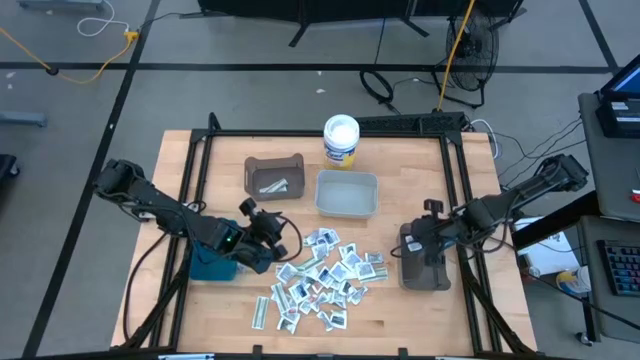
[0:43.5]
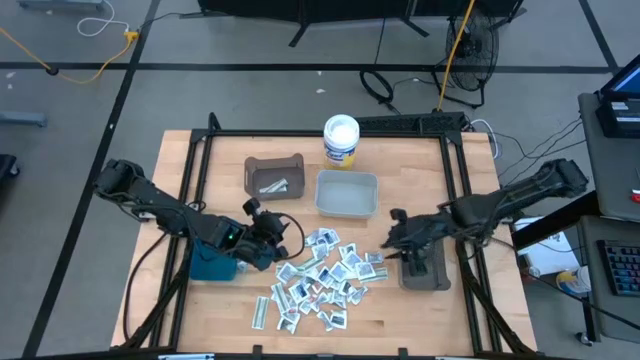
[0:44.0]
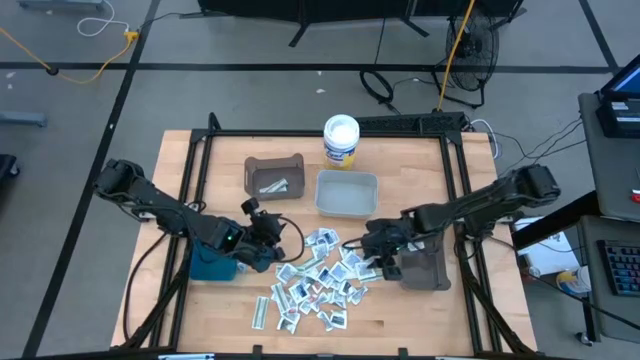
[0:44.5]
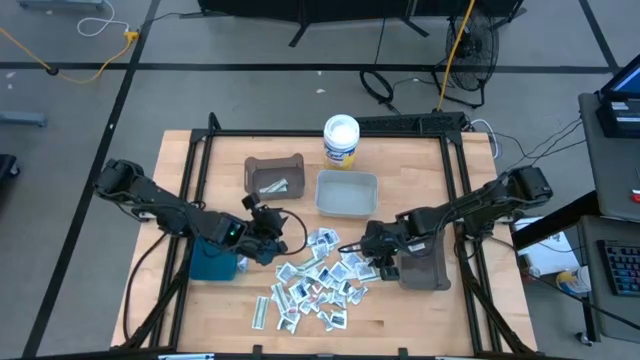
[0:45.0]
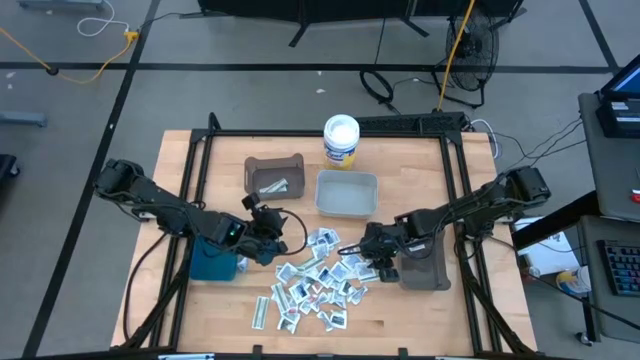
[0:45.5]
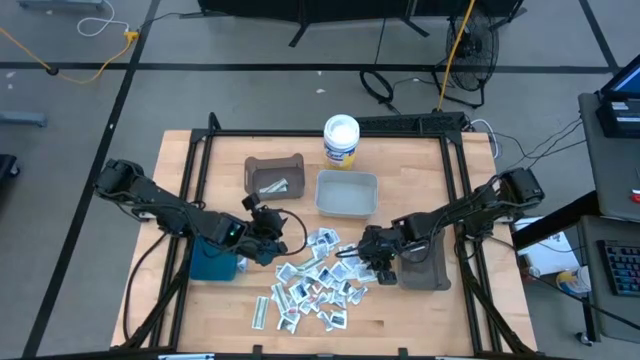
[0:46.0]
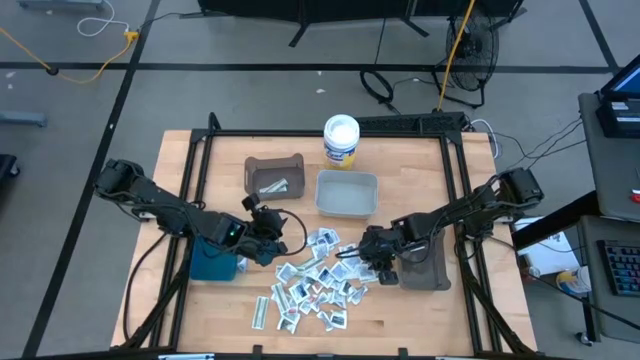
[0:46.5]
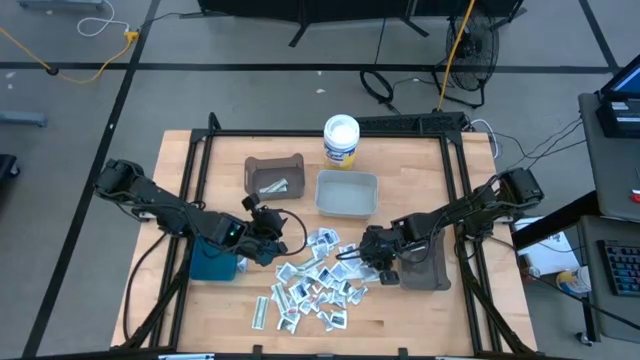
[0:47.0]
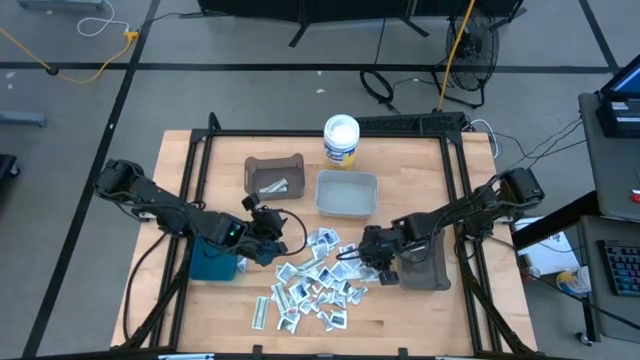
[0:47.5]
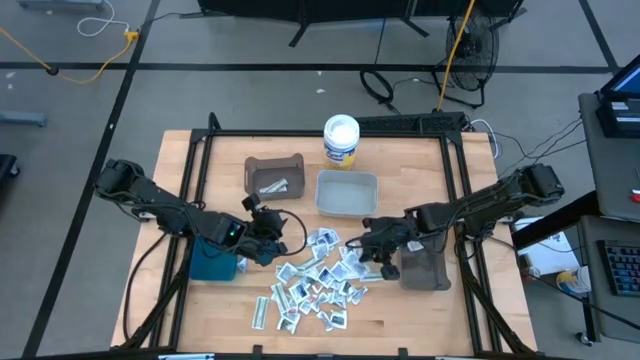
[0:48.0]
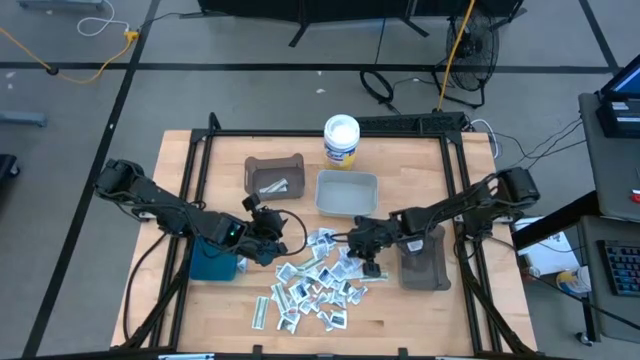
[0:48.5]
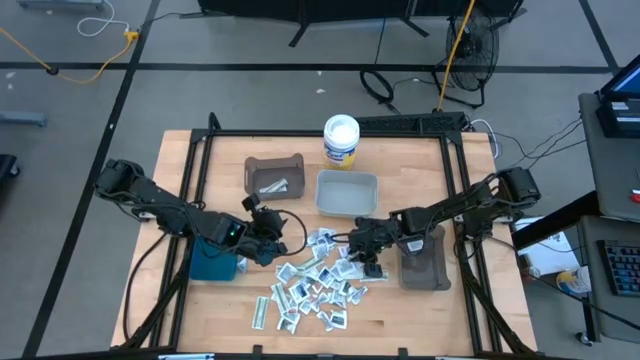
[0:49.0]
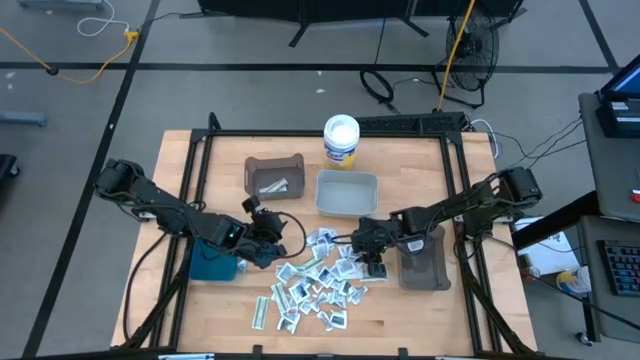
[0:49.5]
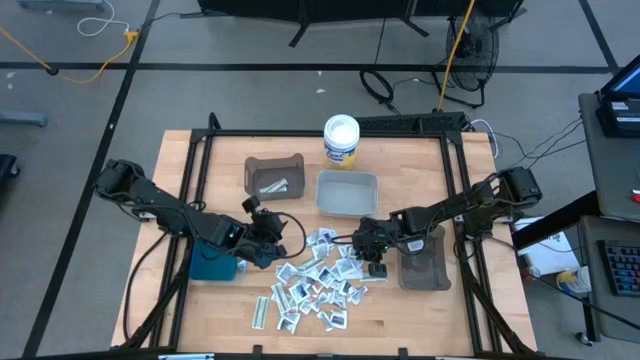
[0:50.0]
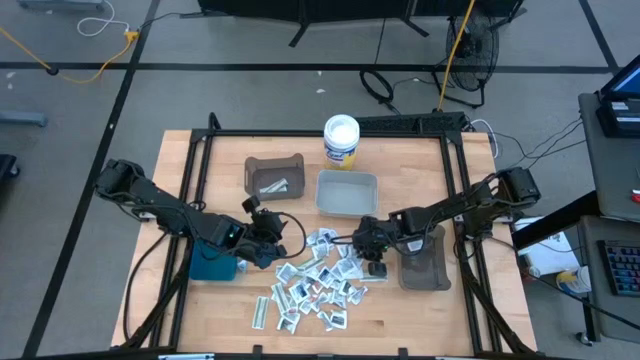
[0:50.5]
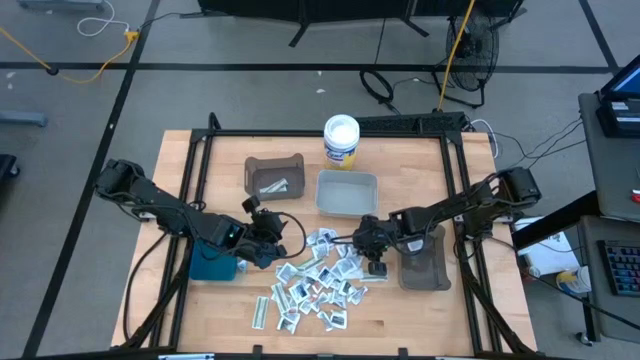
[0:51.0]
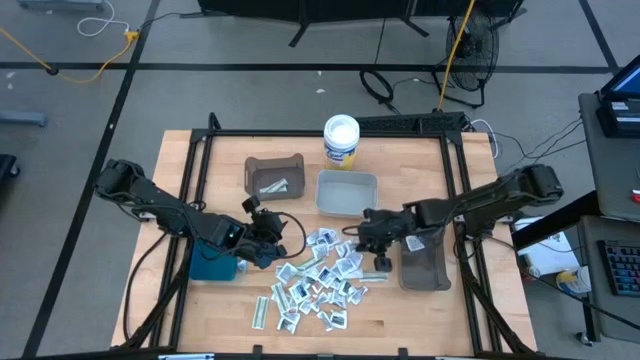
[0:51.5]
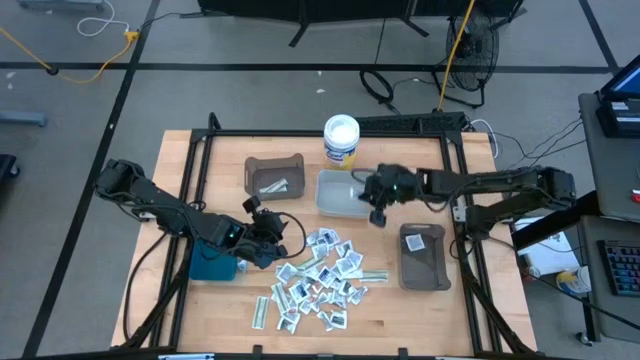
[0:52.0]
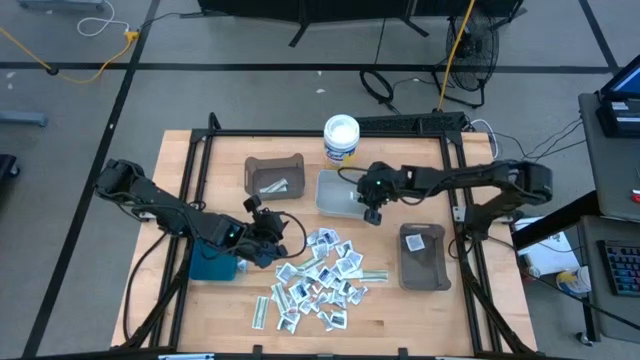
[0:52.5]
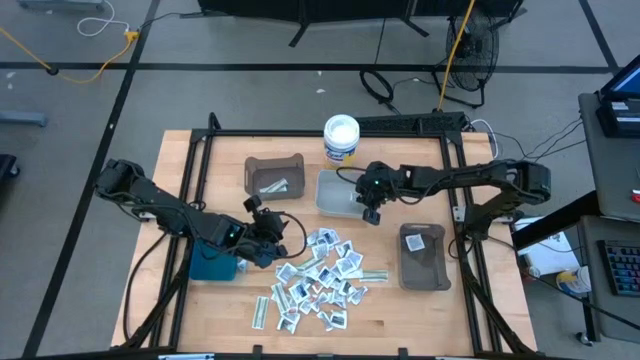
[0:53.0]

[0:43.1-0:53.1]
Task: Pick & Place First Aid Supplies
Put the gray towelette pack into the gray bin

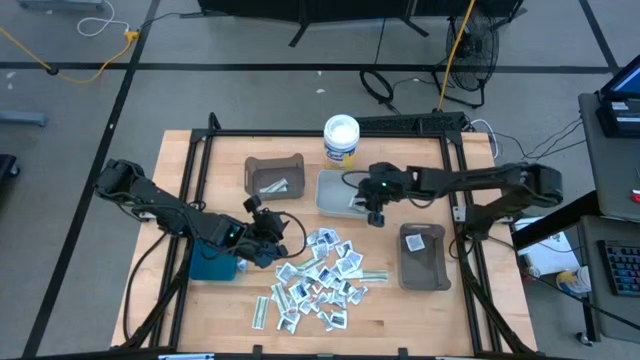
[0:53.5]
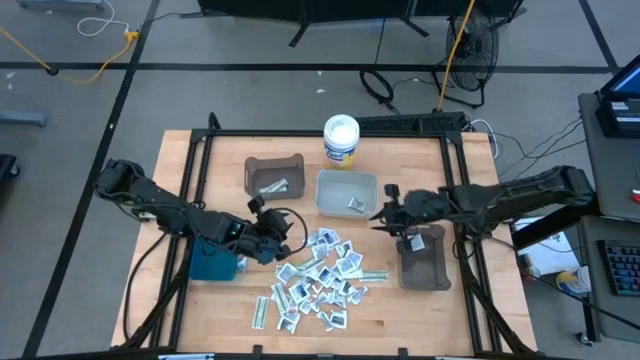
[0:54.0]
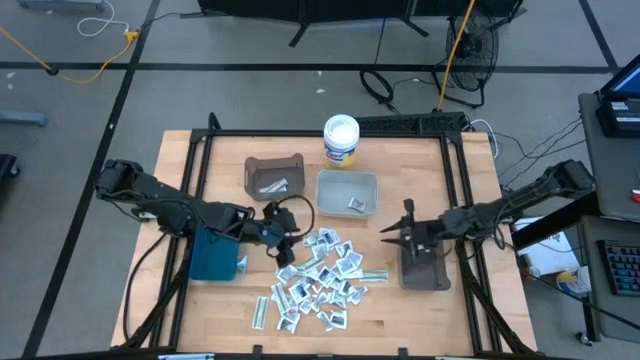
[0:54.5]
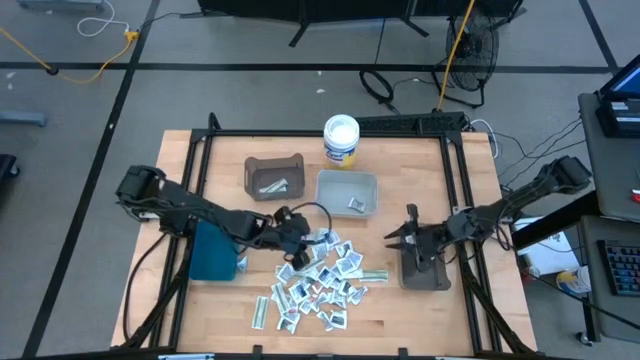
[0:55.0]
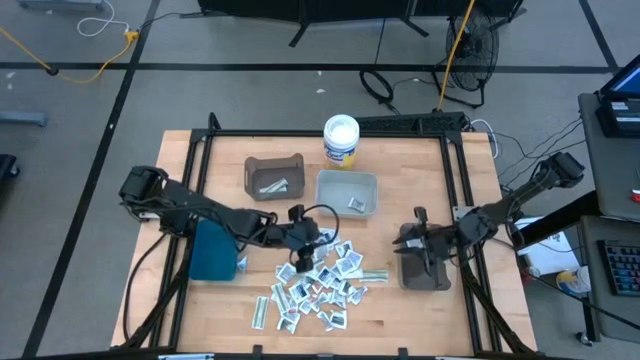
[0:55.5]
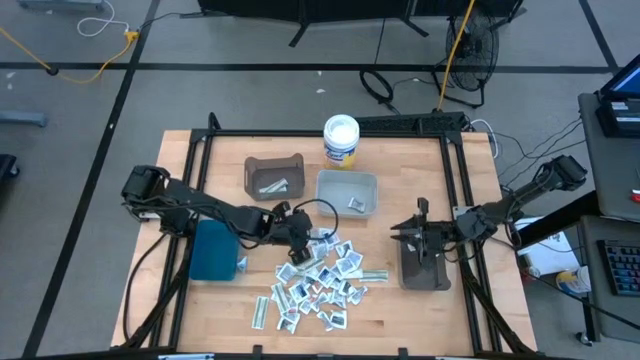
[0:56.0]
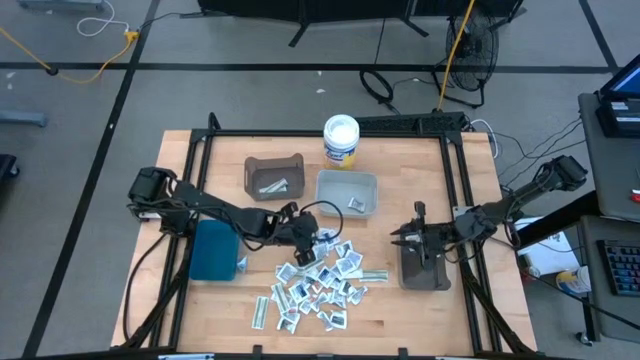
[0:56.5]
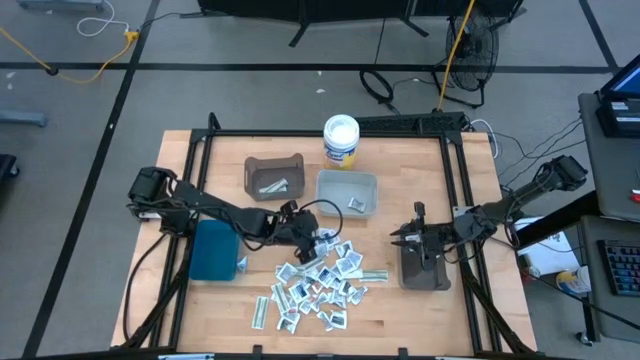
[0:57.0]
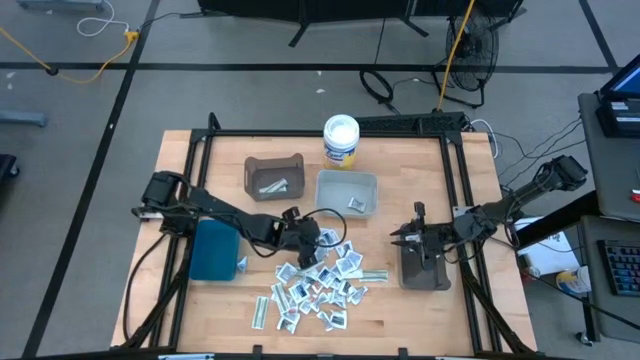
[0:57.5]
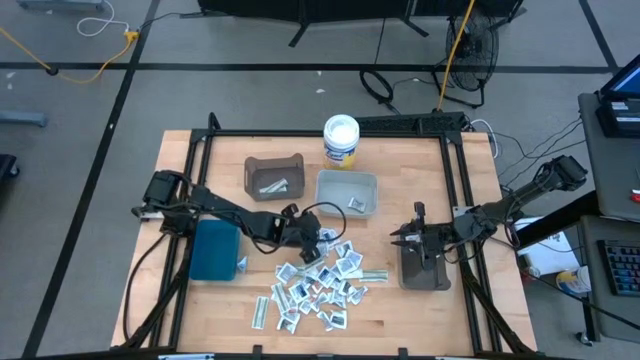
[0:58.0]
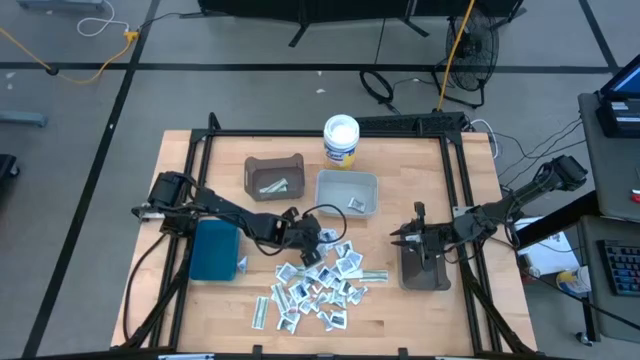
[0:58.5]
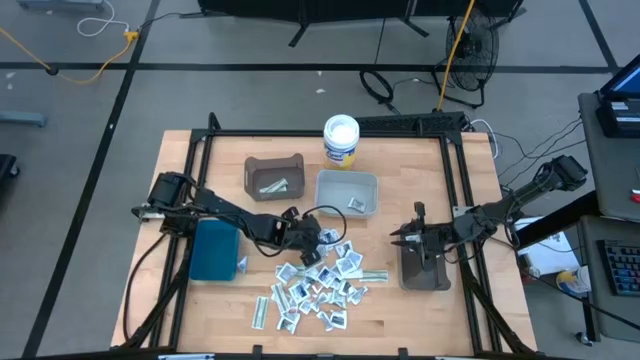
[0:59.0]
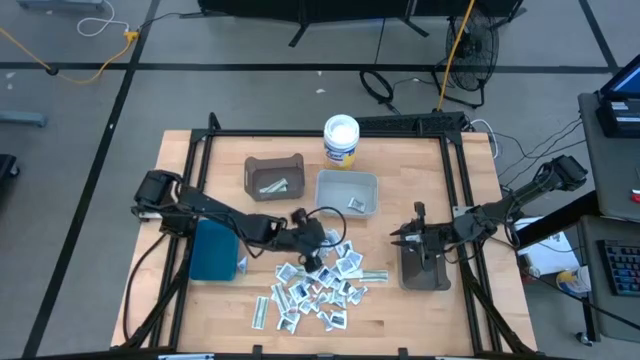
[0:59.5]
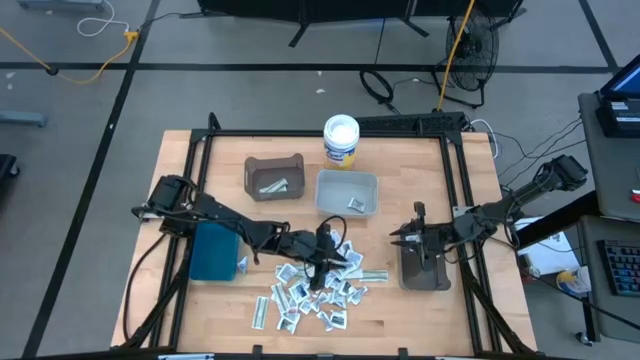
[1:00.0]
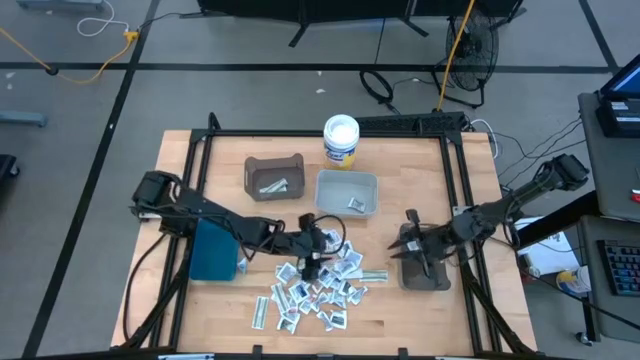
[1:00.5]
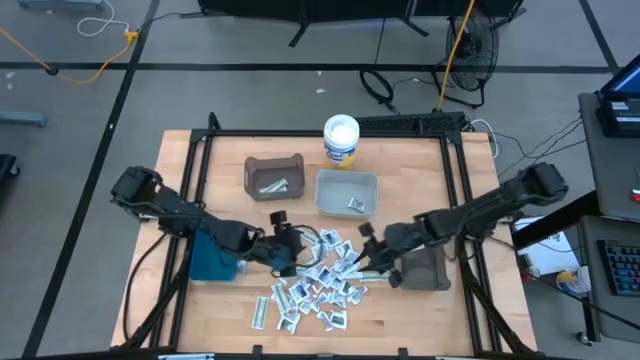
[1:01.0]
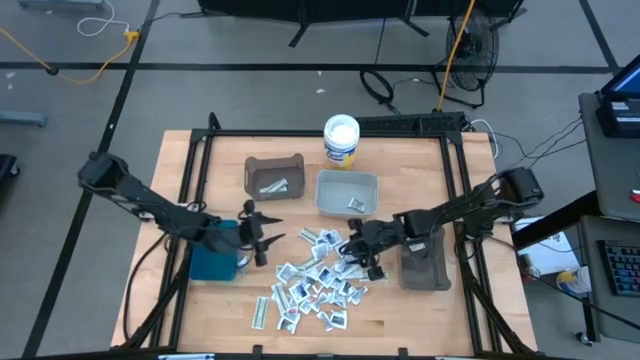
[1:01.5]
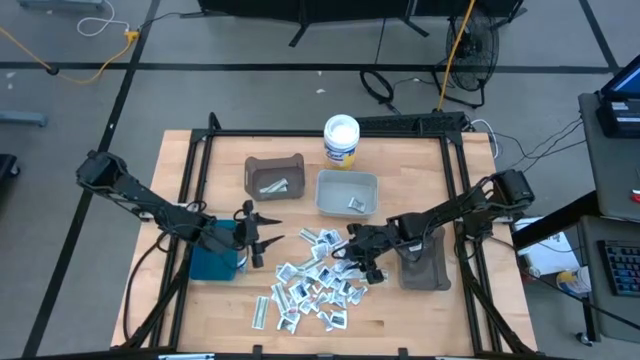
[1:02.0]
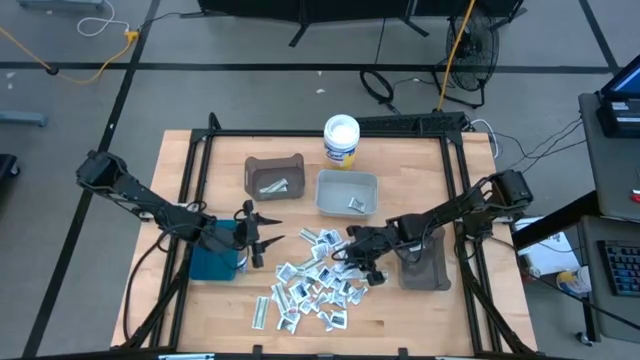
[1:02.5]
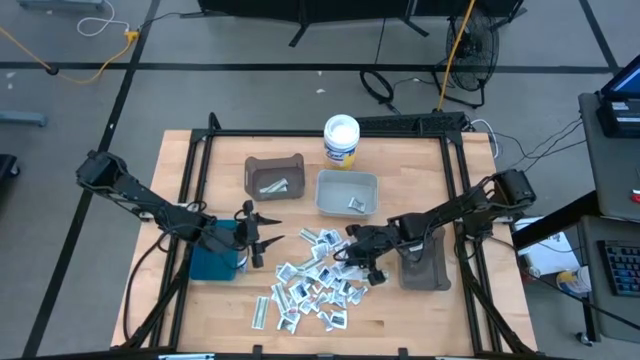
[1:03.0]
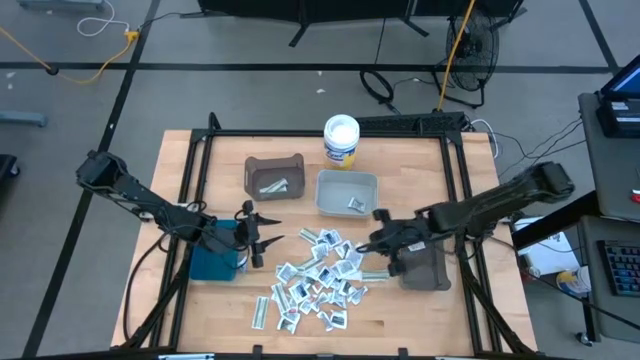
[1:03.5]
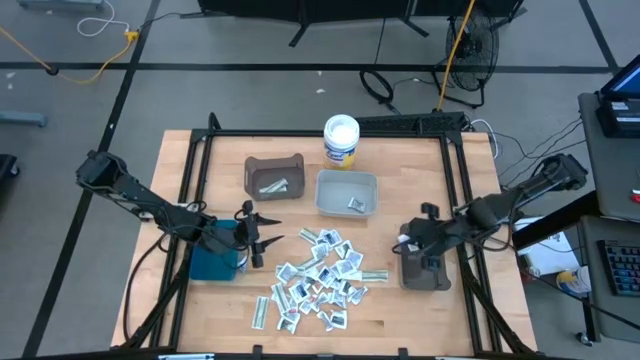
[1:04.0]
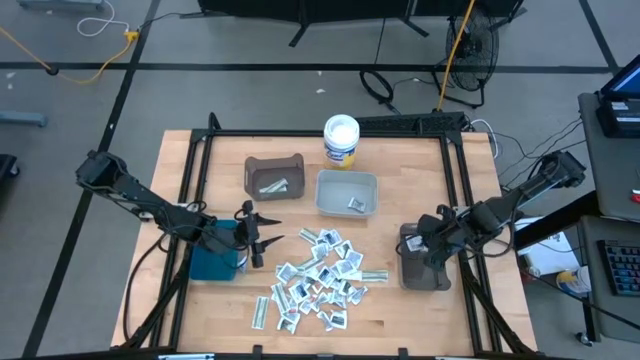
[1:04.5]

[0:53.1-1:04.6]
Put the blue alcohol pad into the bottom black bin
